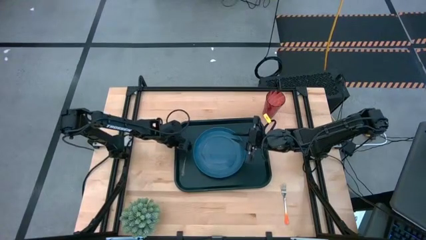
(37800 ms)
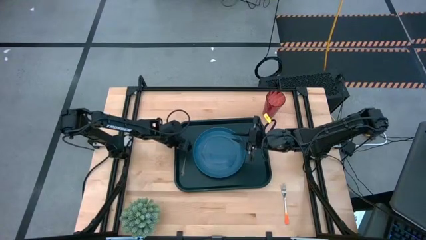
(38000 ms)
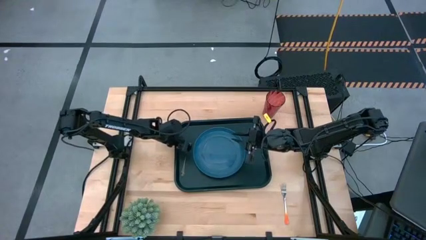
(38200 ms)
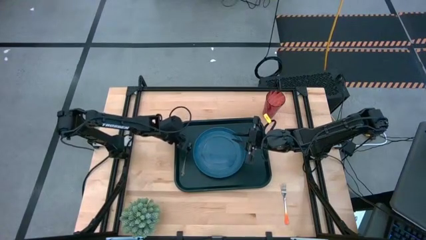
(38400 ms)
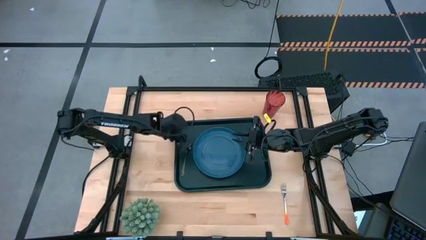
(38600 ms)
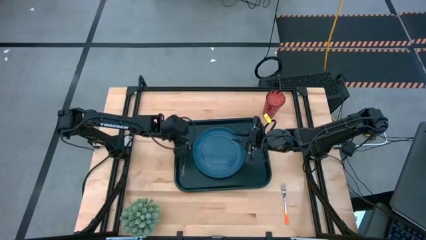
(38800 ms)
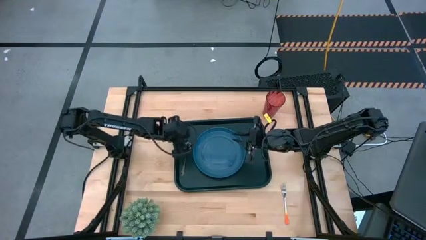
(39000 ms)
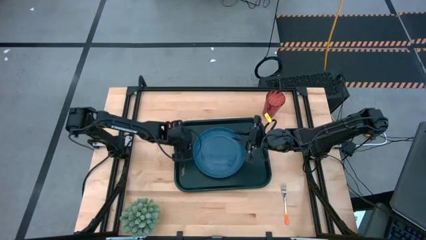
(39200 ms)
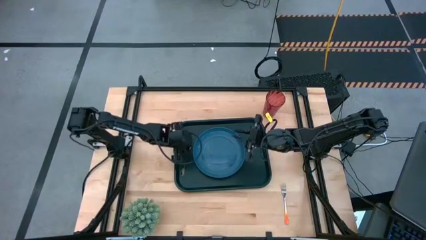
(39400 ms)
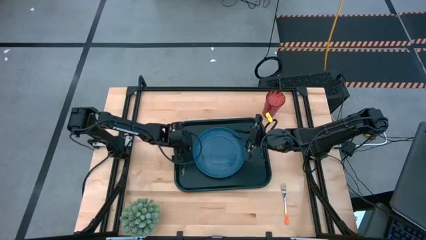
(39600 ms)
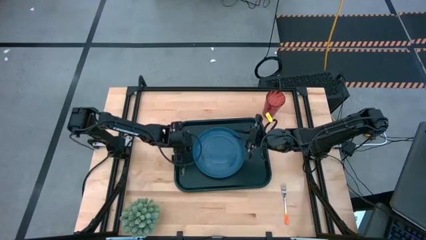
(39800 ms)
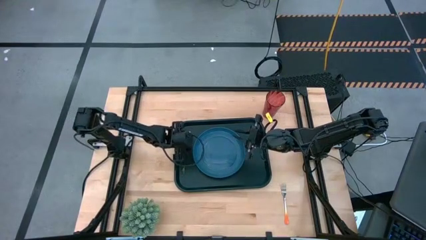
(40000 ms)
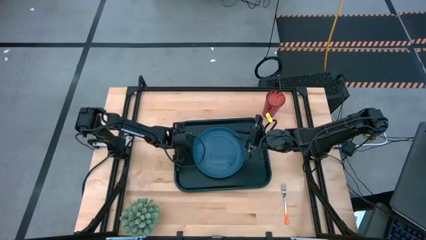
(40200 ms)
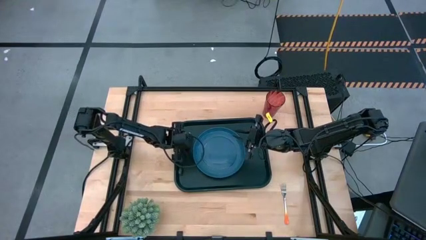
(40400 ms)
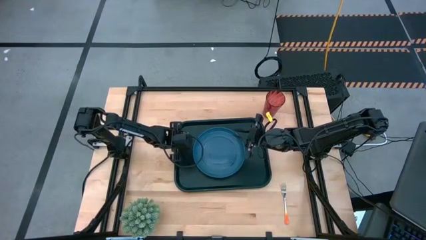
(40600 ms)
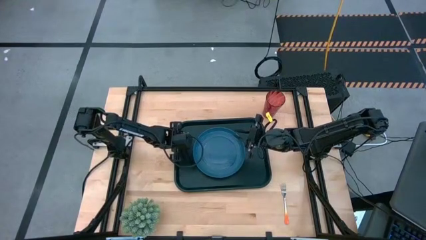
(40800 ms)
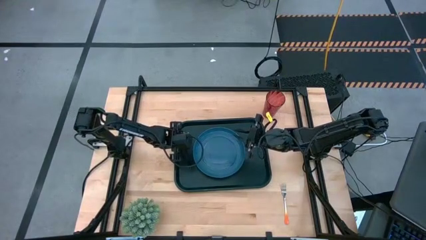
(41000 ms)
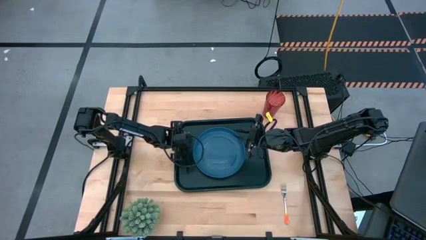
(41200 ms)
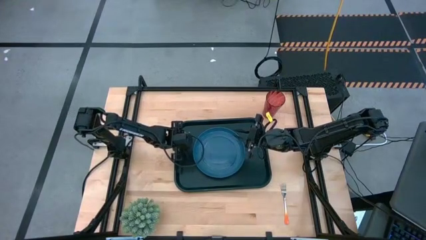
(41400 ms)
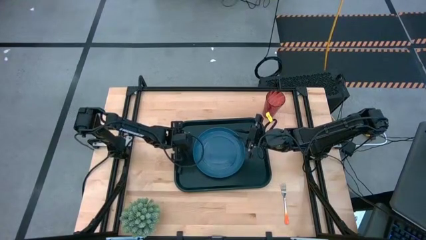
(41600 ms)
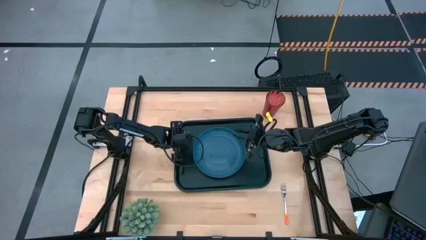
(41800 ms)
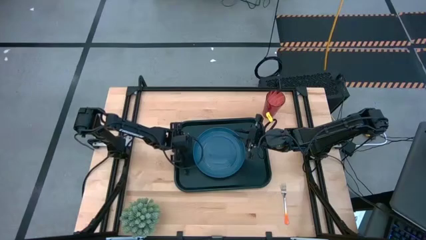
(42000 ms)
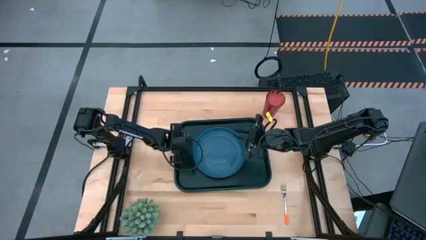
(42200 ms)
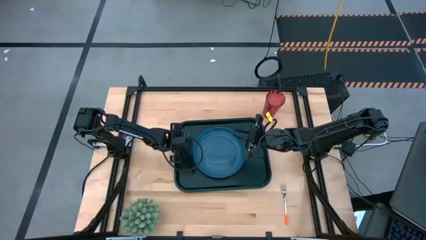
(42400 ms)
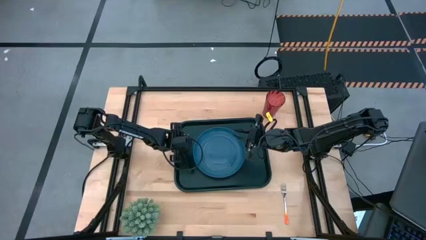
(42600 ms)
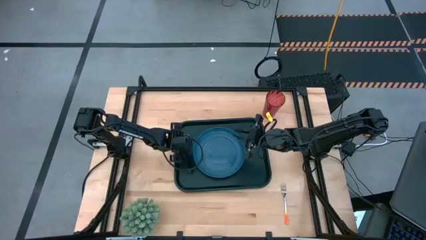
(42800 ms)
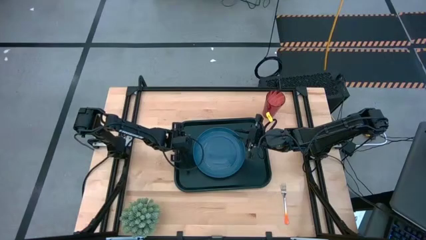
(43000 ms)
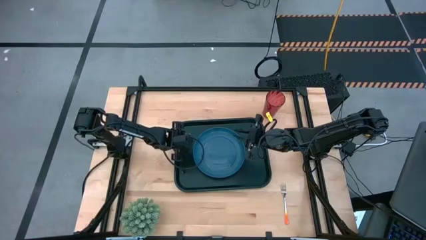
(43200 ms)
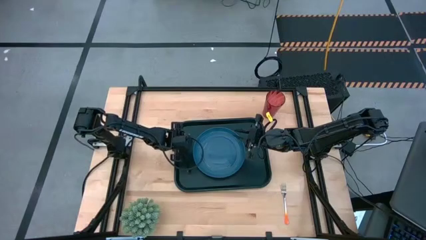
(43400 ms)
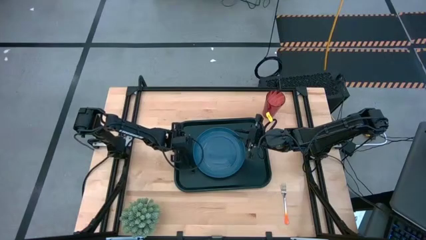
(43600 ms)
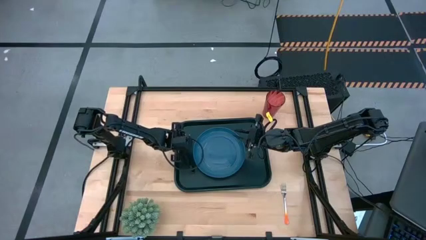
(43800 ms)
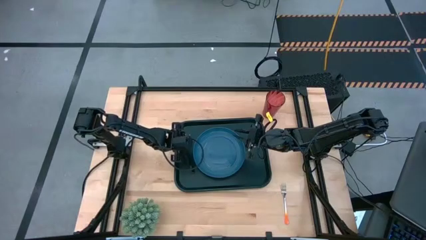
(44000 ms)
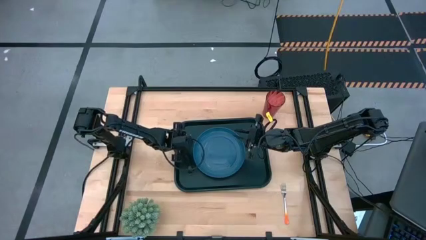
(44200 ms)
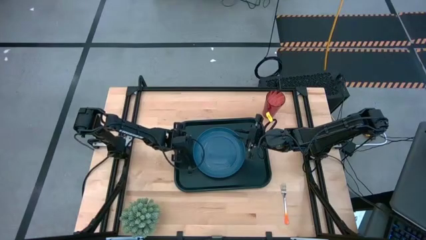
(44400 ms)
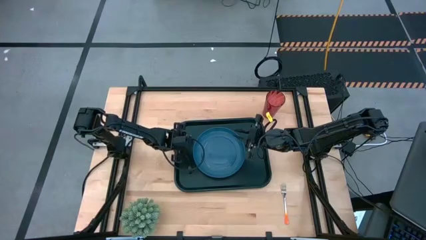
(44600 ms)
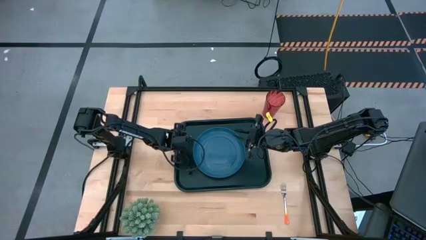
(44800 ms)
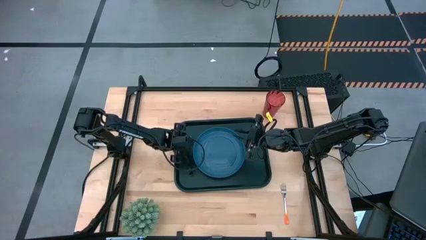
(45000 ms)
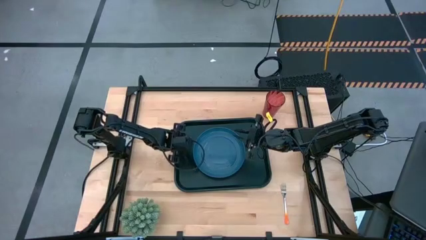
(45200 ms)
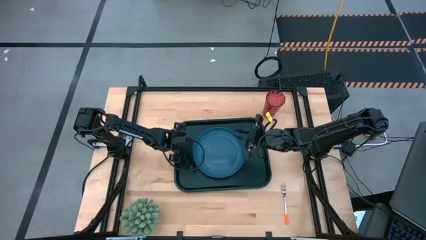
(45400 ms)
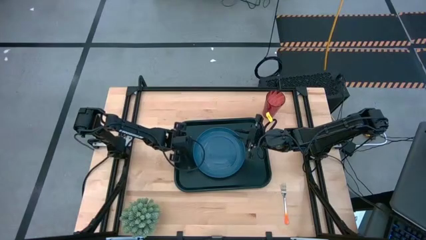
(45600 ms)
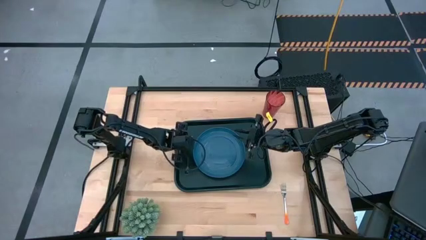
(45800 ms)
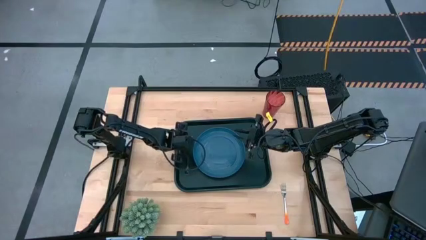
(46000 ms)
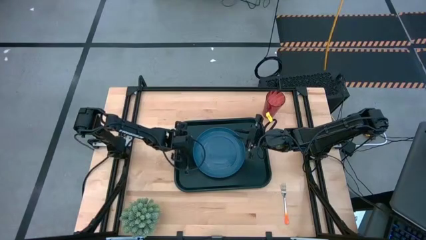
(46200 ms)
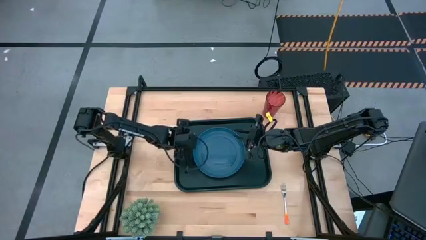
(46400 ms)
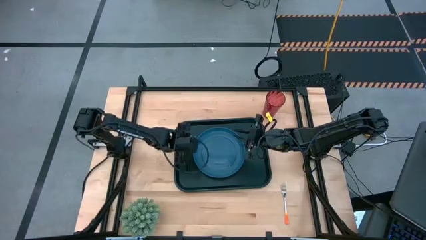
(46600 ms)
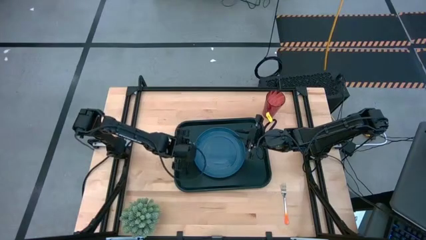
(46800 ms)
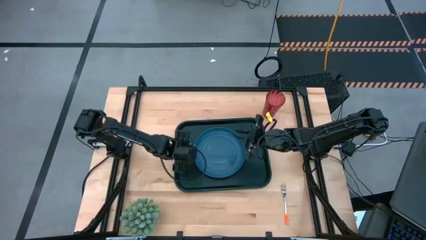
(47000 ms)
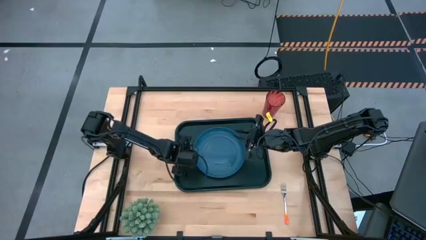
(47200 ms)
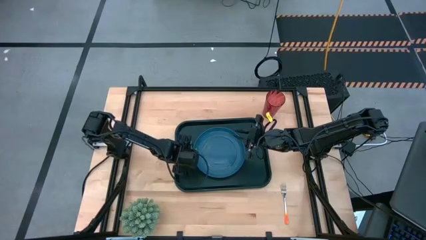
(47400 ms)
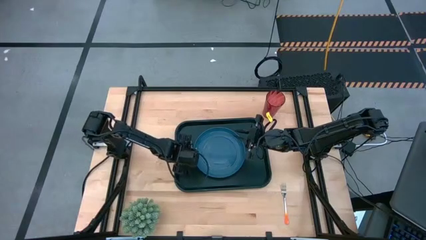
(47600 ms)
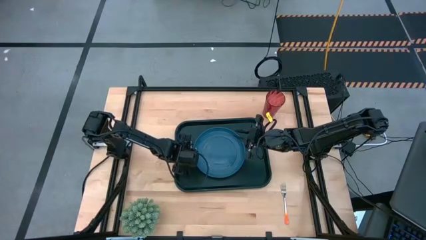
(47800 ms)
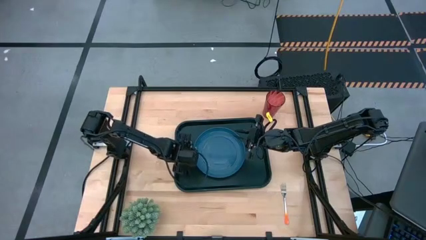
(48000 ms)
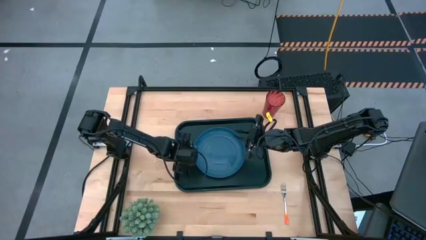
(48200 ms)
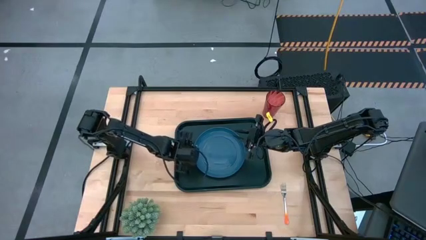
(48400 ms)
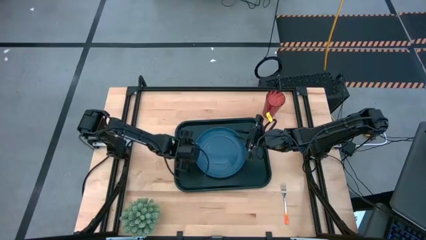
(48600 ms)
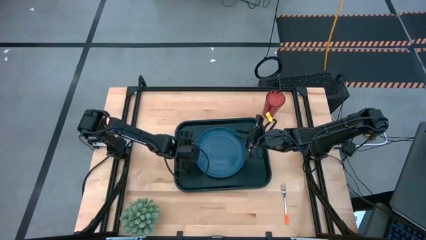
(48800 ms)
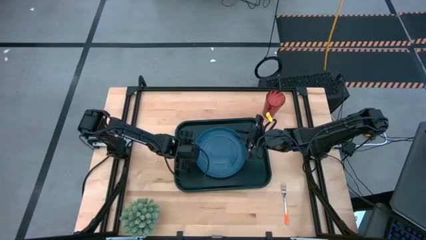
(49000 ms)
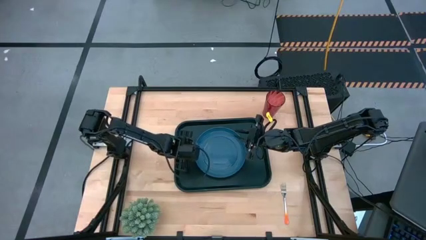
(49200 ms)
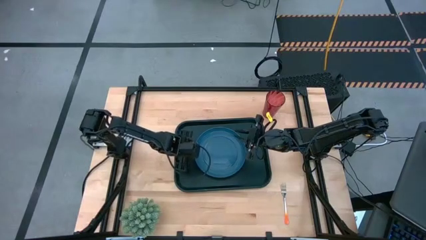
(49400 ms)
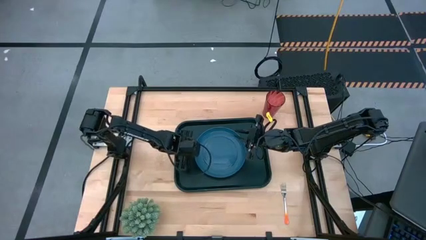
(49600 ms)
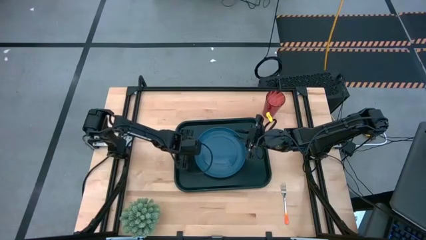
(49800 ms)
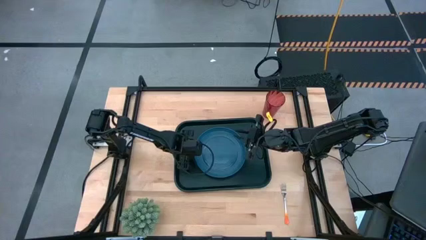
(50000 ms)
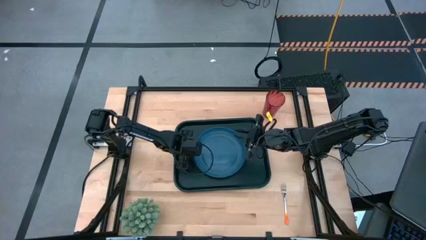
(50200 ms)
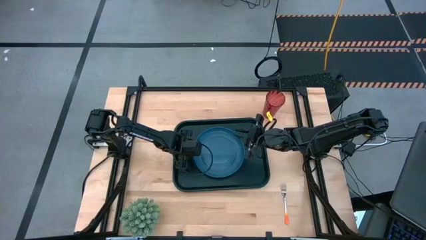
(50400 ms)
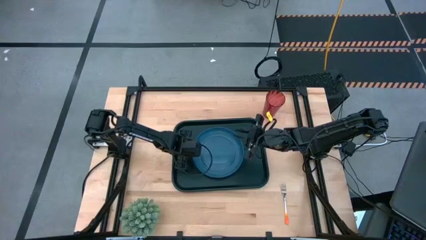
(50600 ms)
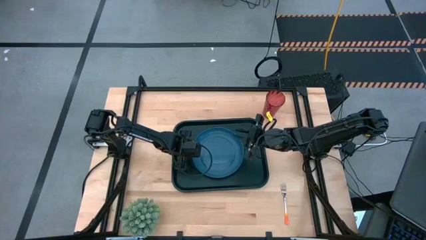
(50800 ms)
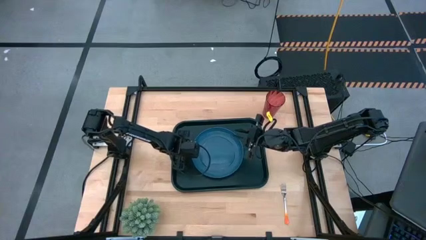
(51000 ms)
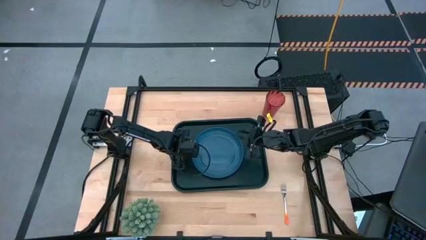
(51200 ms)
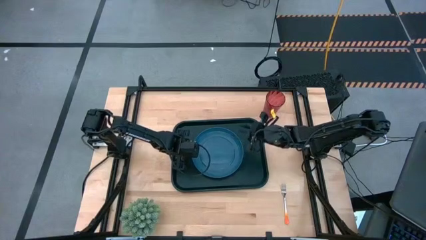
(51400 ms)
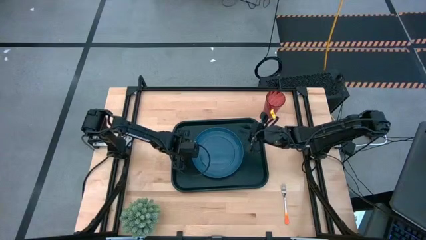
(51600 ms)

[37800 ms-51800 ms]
Task: Pick and place plate/cup/fork/spoon on tray
Put the black spoon to the left of the blue plate on the black tray

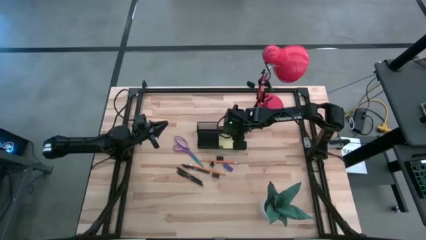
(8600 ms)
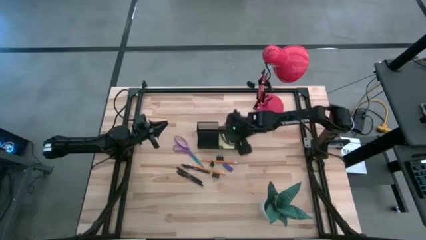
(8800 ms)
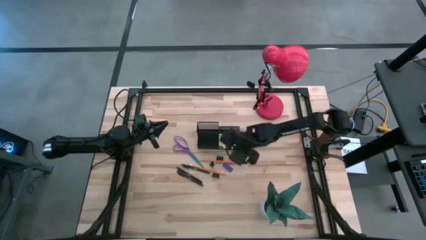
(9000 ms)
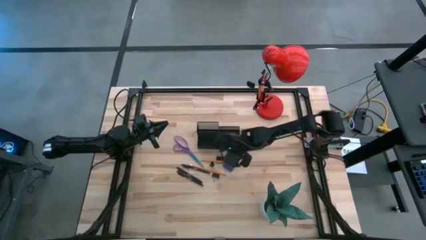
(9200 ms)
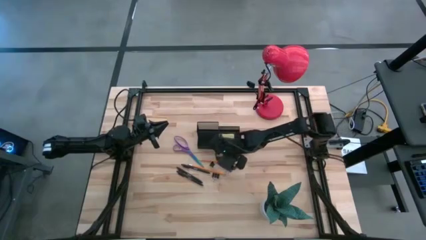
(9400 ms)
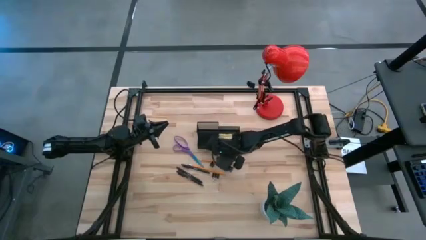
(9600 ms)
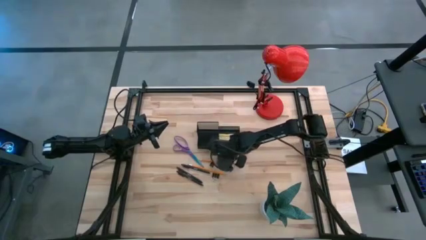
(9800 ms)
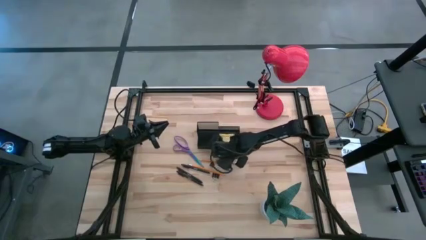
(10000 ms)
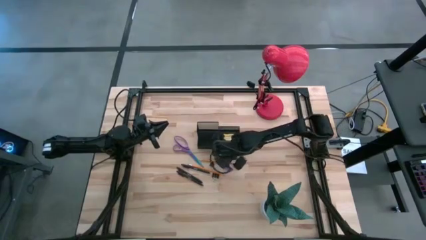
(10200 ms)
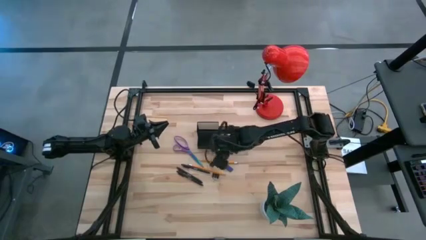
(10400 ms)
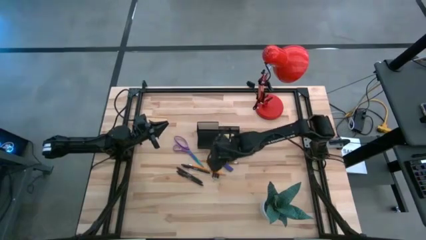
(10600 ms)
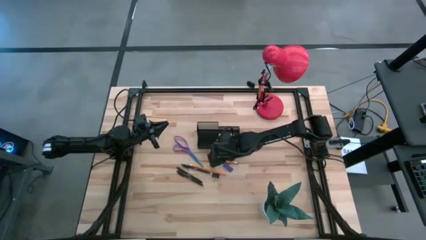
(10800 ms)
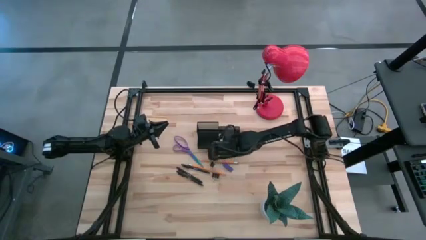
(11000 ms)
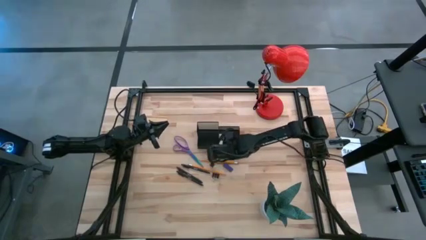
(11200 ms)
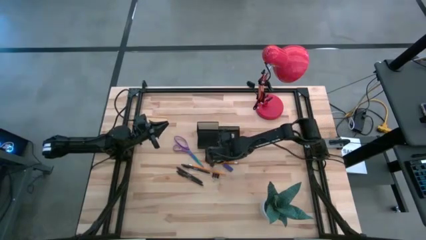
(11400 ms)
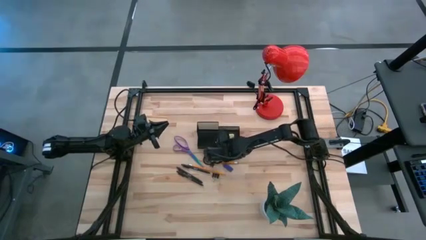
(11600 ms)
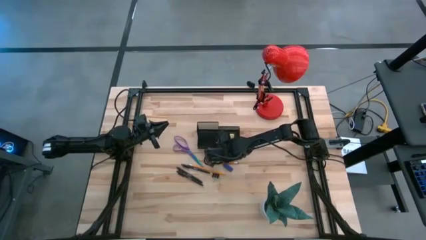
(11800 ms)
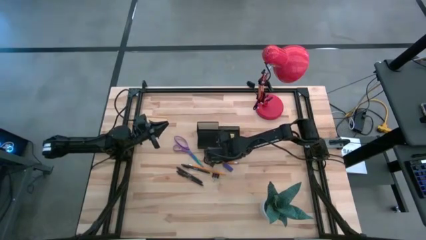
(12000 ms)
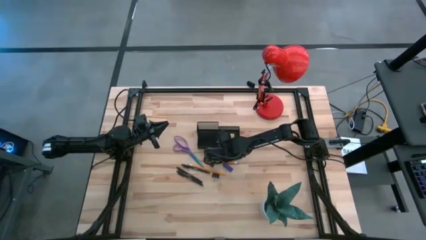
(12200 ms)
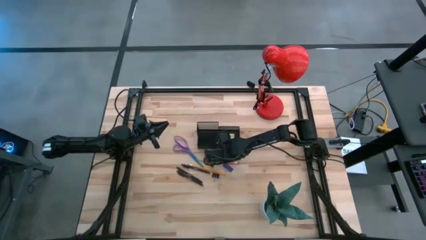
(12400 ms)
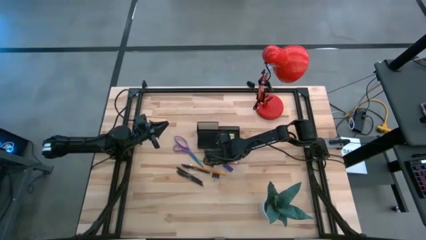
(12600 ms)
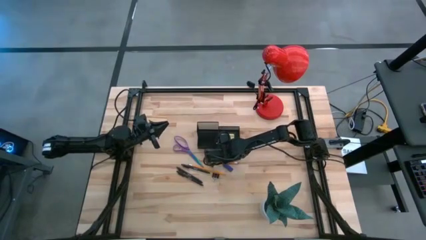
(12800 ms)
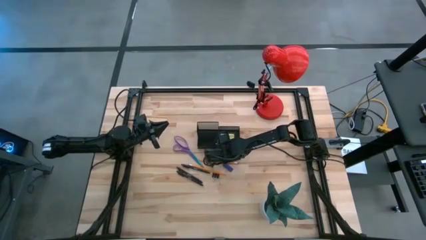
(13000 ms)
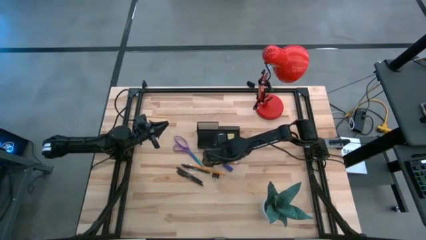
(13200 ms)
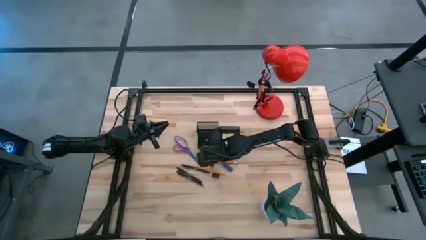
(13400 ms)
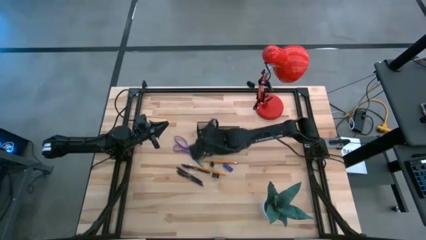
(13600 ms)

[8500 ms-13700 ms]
Task: Pick and place office supplies into organizer
Put the top black binder clip into the black desk organizer
